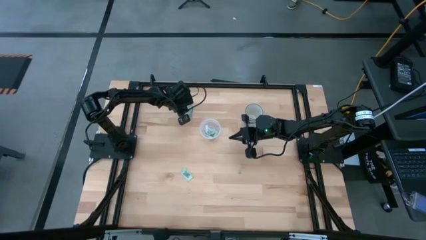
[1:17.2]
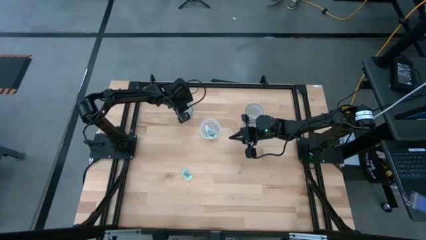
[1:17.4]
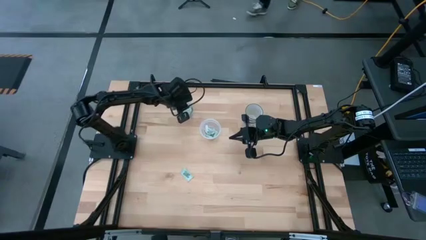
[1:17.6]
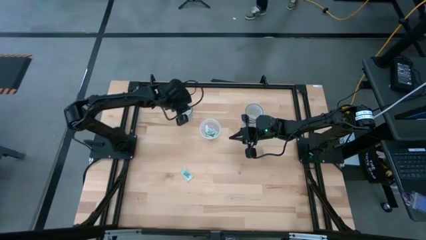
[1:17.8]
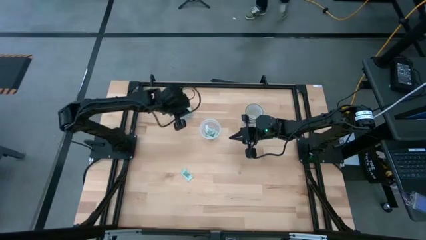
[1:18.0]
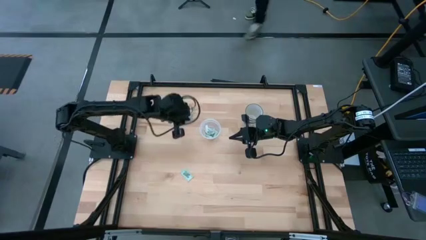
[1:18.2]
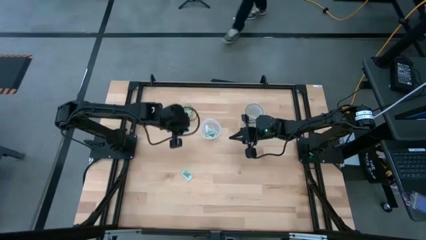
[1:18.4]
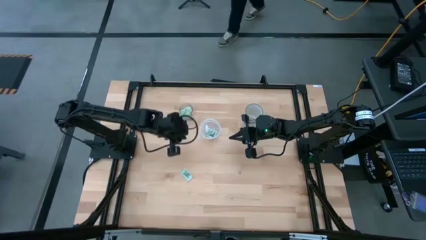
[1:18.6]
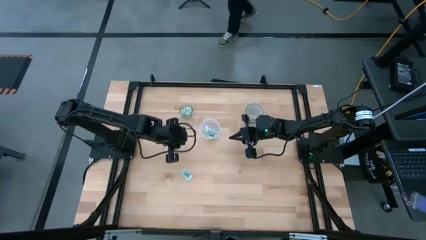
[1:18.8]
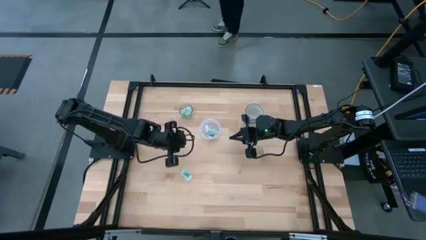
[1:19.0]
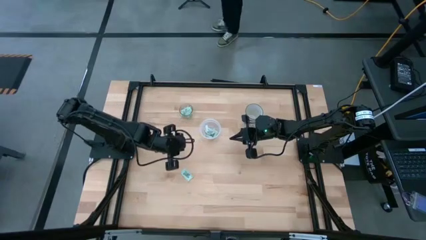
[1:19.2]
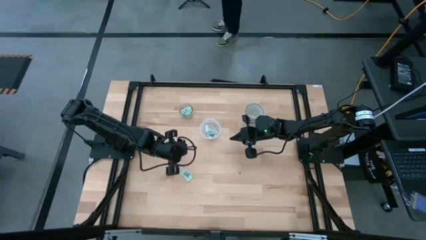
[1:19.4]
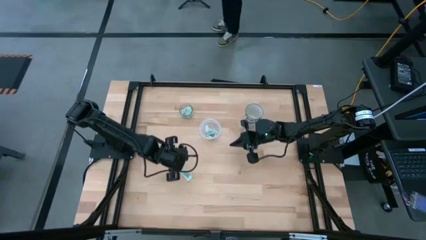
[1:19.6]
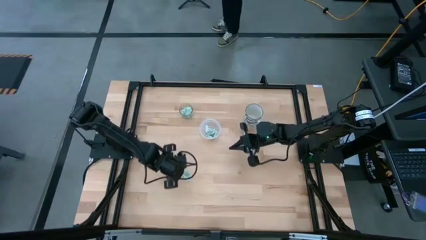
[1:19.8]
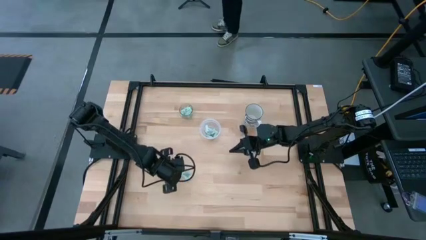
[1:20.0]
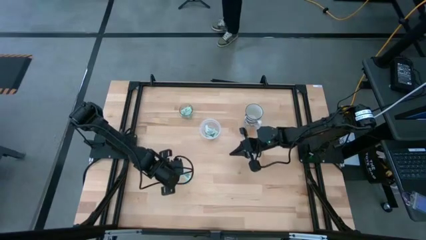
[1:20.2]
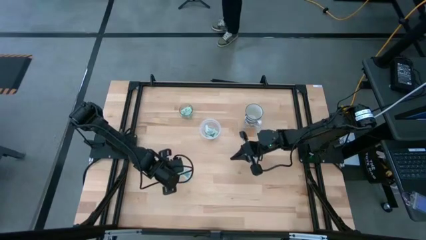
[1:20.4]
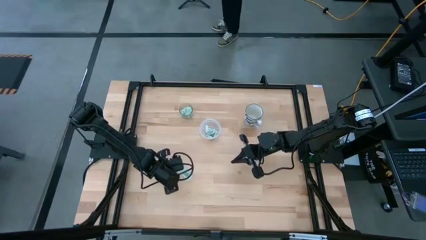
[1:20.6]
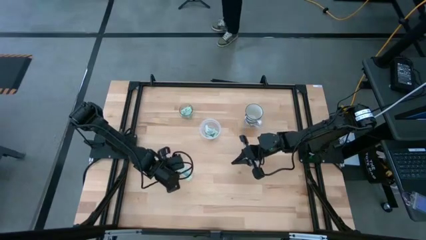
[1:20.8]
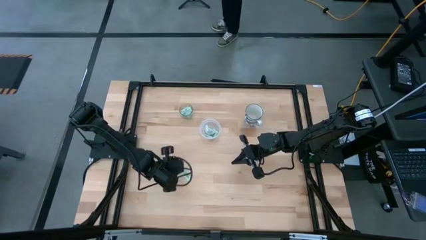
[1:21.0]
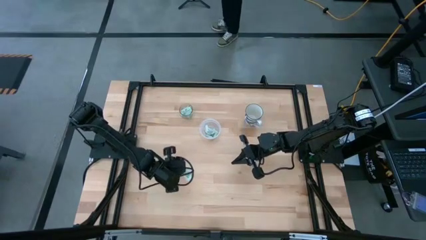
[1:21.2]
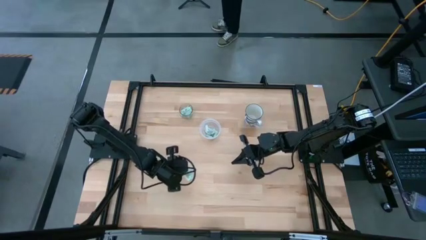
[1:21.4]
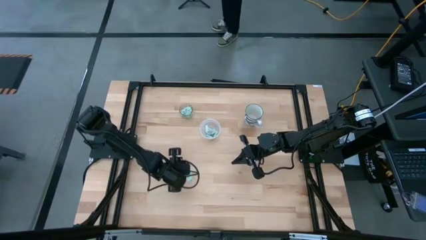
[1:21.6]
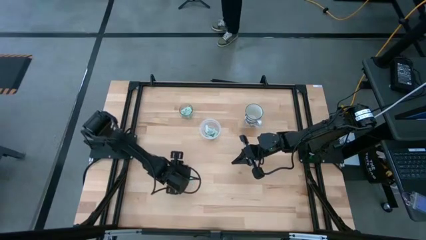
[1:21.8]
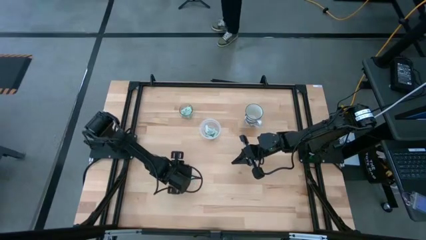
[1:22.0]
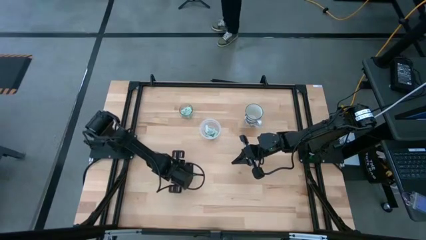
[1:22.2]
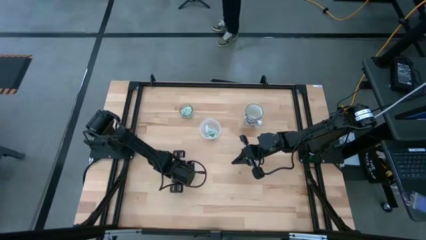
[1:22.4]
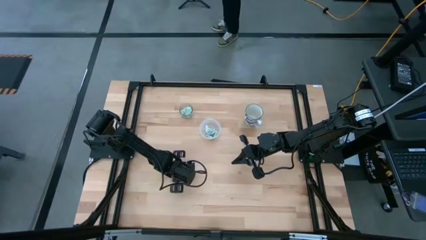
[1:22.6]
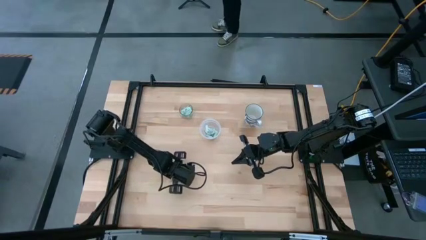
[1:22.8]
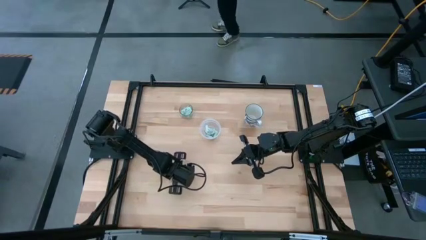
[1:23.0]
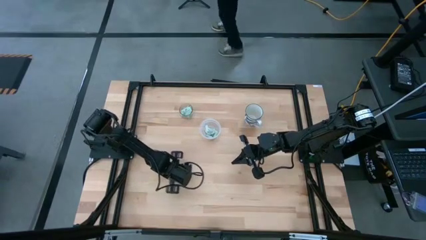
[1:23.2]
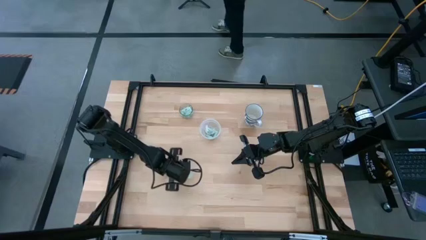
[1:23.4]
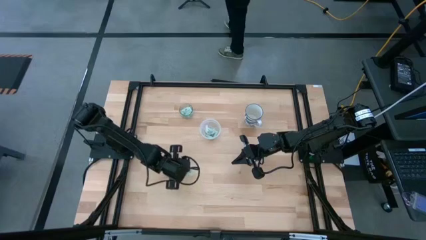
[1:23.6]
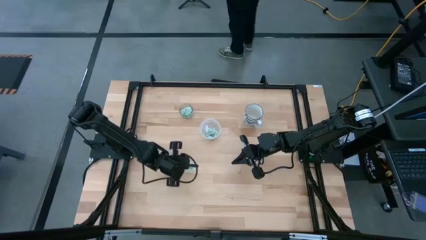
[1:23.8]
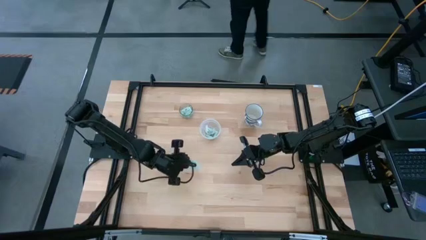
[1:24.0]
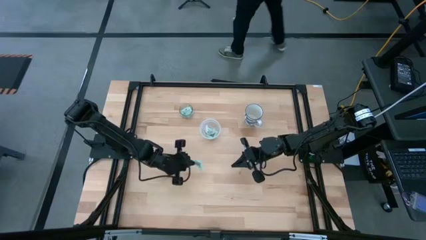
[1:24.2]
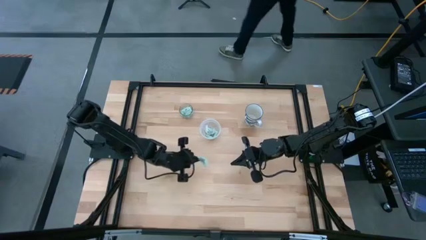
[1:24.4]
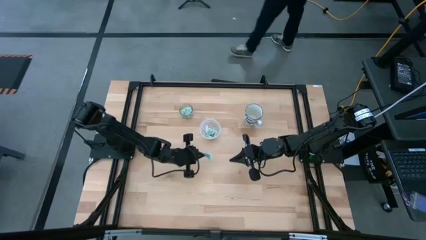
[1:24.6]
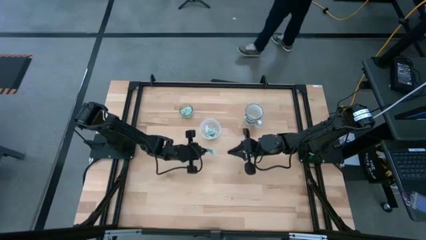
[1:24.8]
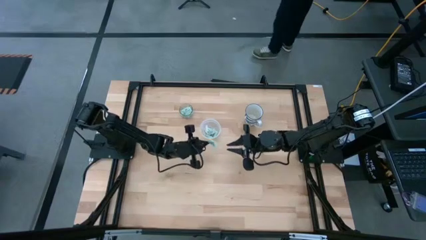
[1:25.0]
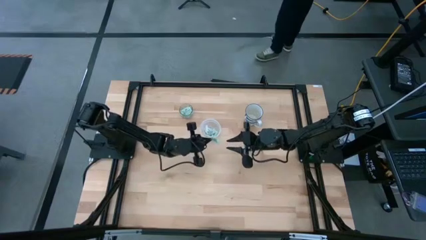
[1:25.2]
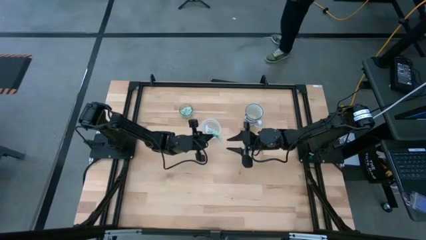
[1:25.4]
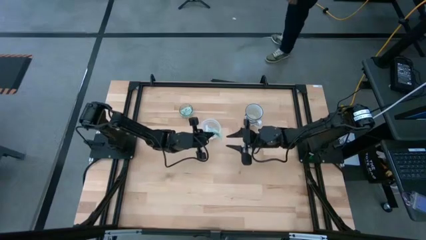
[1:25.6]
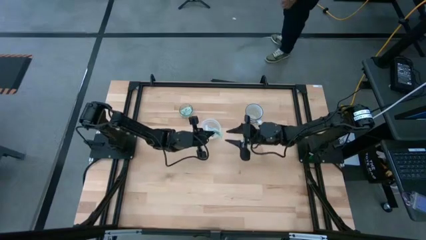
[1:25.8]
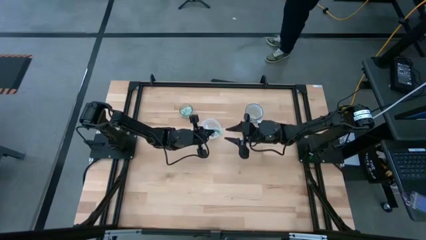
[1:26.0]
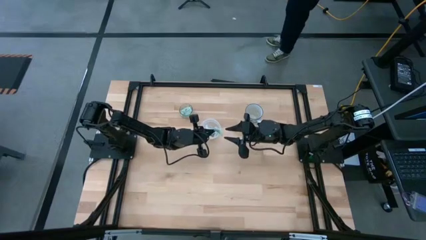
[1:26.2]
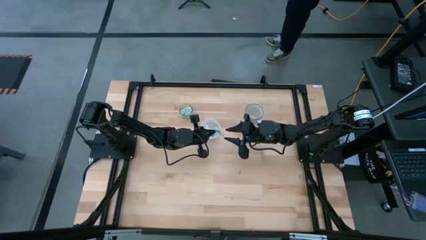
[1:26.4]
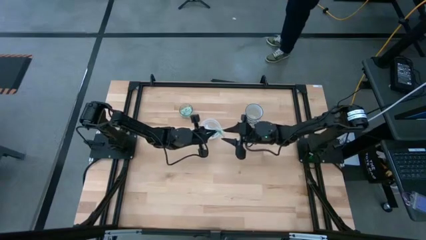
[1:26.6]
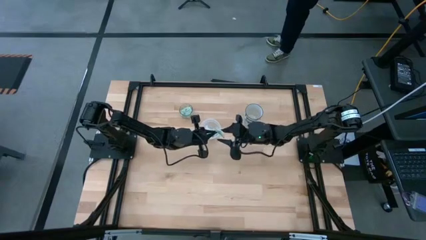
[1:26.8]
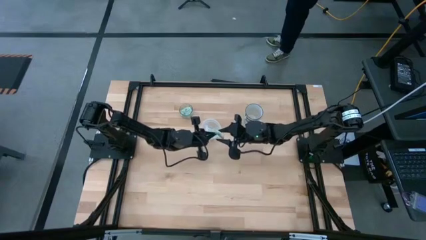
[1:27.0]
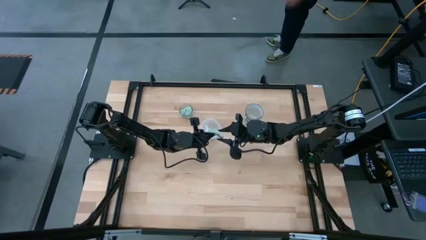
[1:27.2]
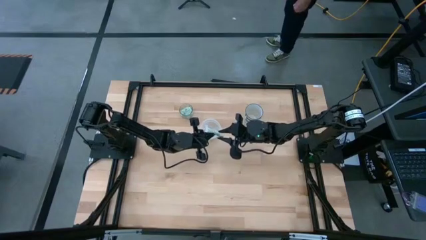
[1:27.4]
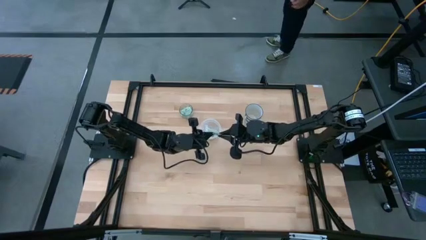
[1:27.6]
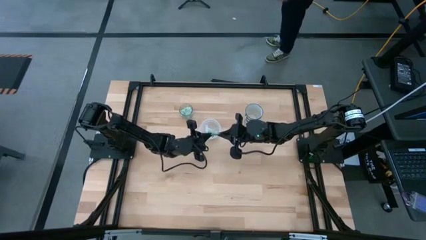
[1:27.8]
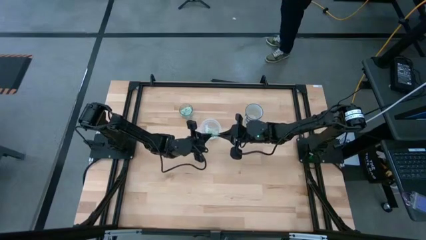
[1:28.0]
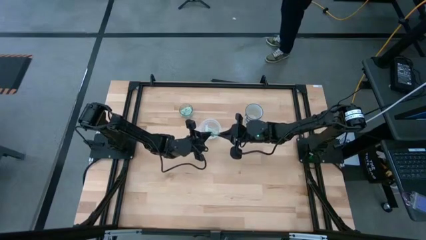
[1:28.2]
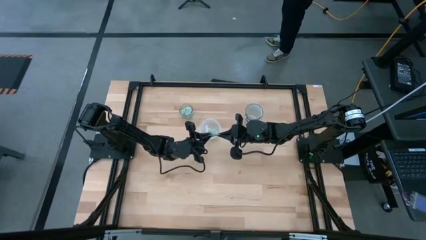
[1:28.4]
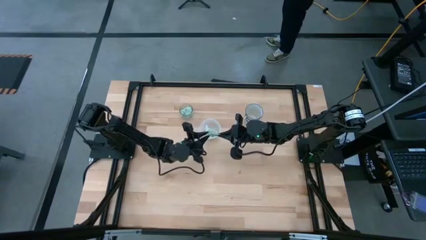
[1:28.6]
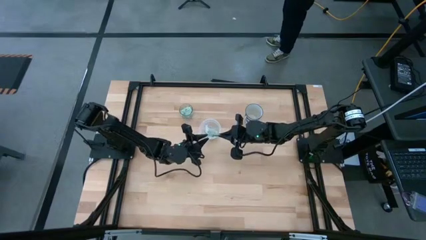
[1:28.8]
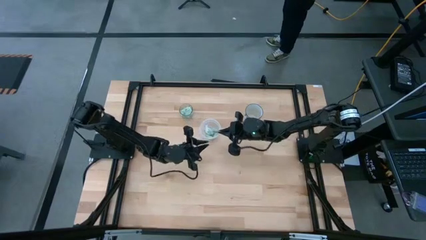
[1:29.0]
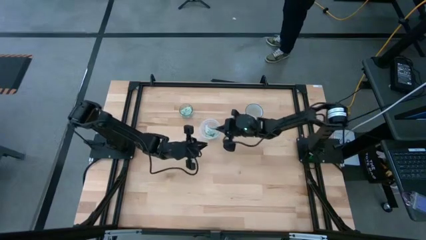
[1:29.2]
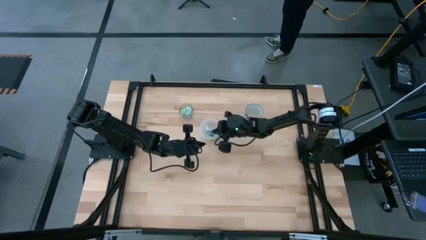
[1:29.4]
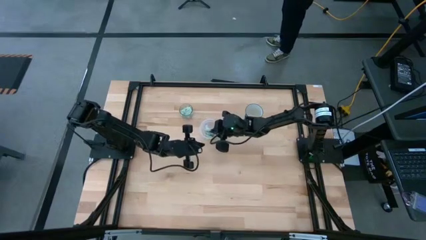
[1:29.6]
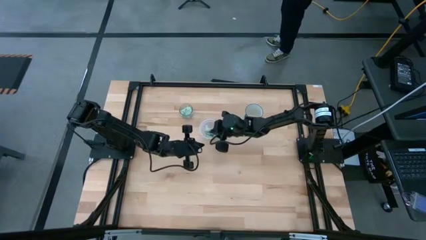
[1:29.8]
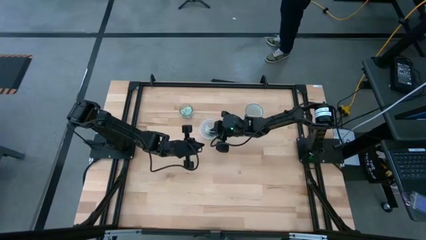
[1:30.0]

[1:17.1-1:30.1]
Task: Pick and place Stevia / Truvia into bins
Put the stevia packet into the transparent container

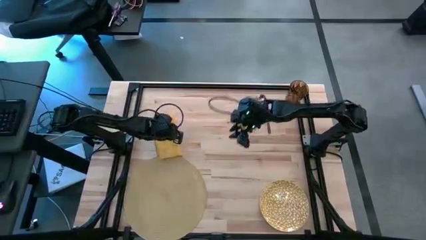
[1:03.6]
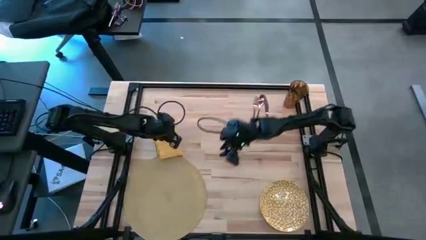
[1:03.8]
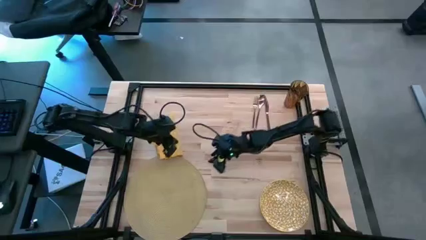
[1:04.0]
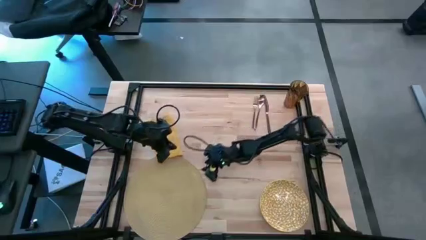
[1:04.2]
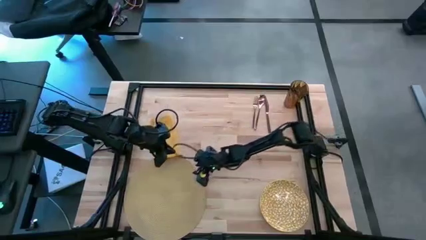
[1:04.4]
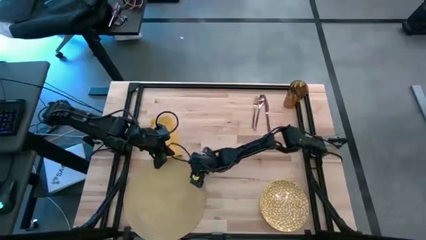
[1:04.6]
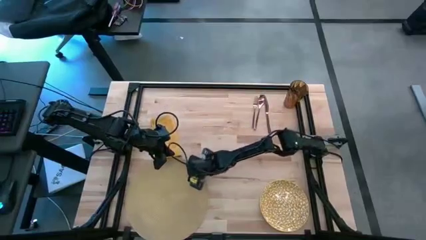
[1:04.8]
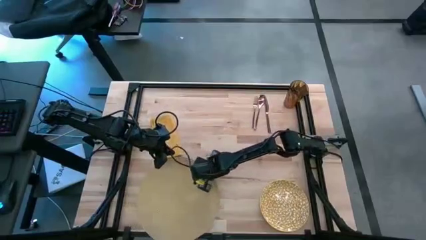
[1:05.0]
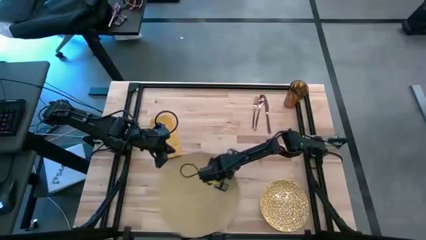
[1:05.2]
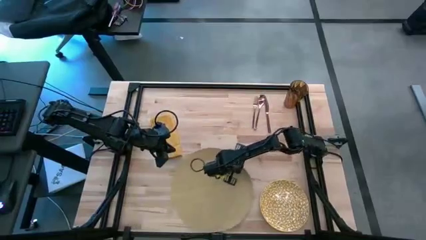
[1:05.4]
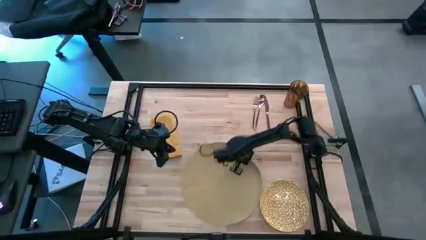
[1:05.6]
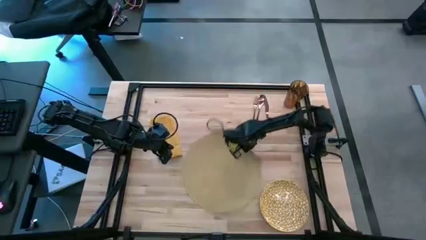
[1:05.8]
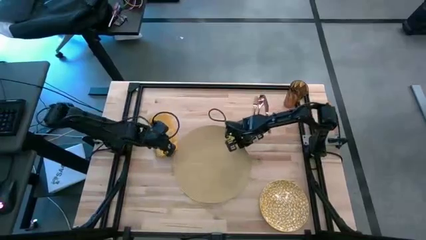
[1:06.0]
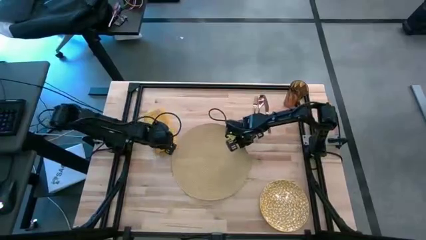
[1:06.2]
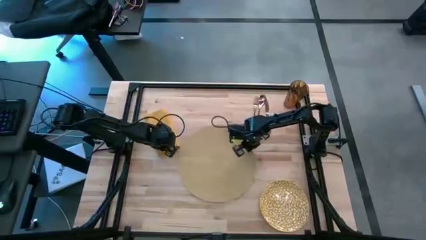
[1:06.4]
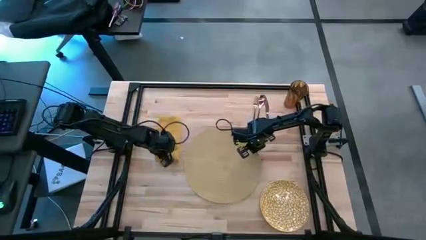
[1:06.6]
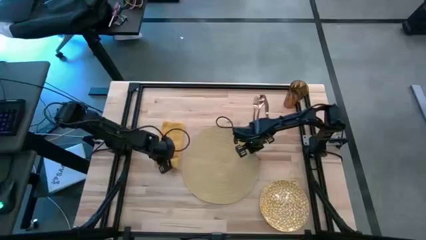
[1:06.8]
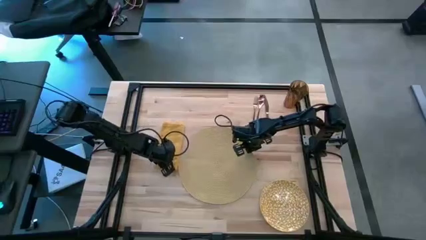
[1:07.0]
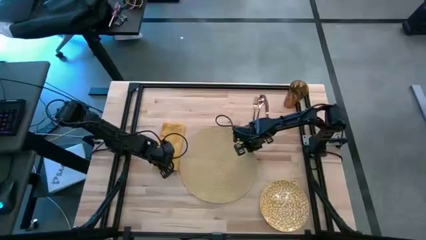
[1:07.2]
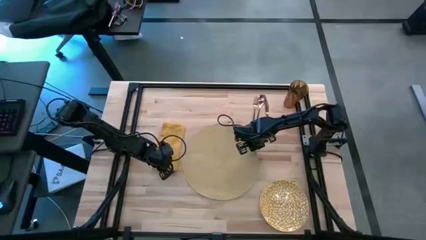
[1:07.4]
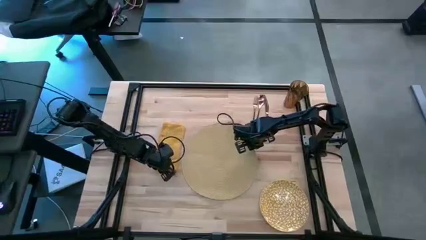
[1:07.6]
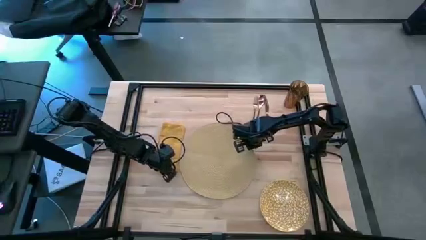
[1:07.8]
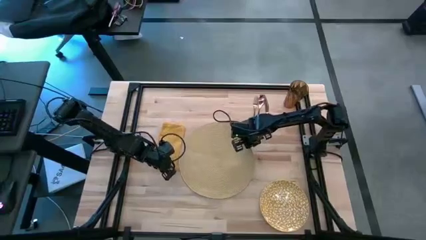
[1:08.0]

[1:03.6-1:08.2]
Task: Set table place
Move the brown placemat to the center center of the table
